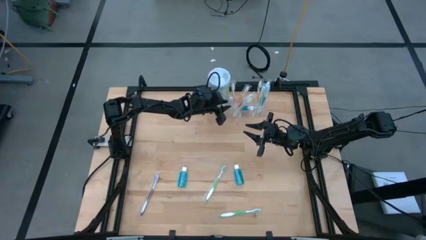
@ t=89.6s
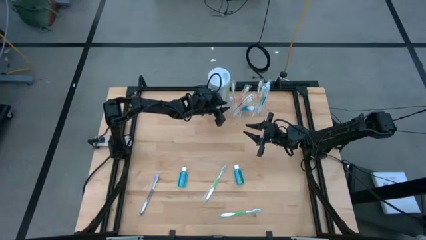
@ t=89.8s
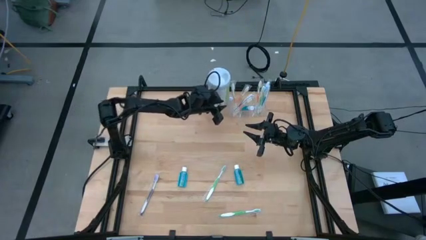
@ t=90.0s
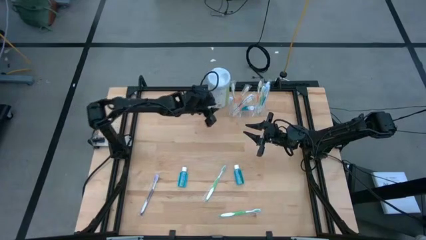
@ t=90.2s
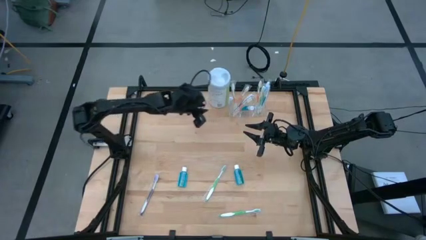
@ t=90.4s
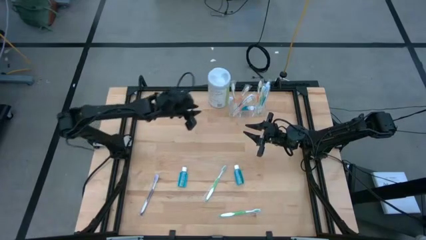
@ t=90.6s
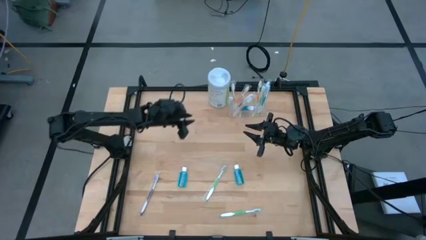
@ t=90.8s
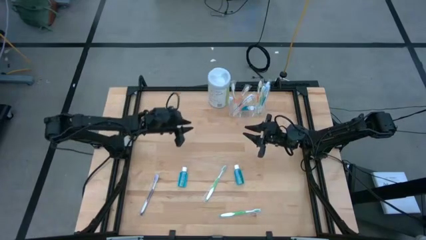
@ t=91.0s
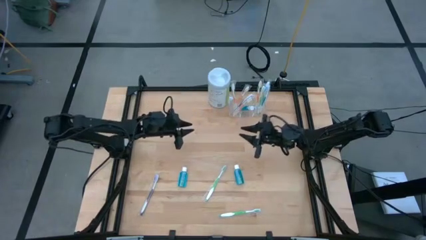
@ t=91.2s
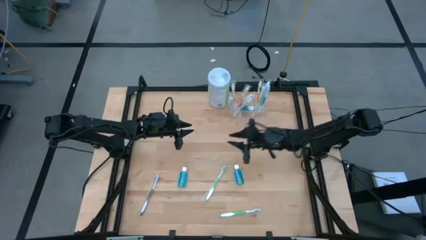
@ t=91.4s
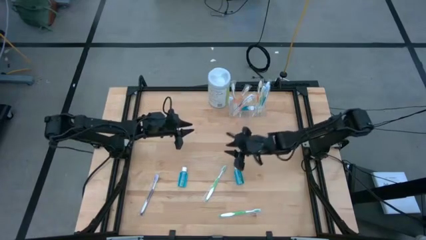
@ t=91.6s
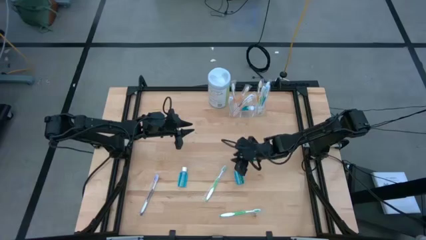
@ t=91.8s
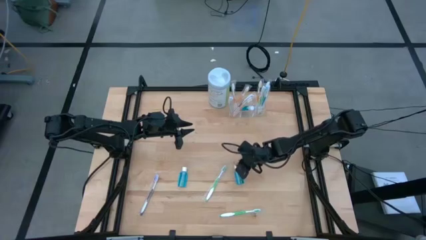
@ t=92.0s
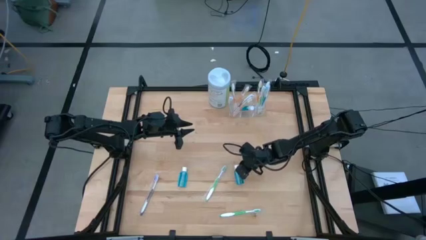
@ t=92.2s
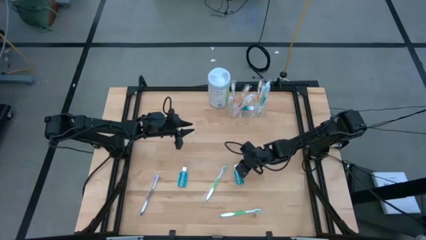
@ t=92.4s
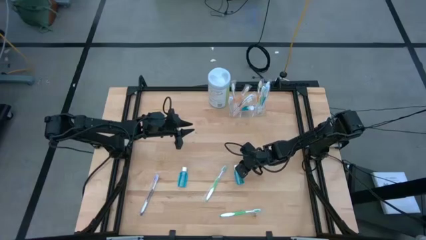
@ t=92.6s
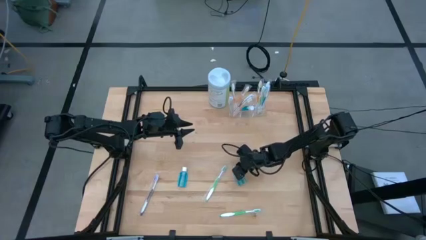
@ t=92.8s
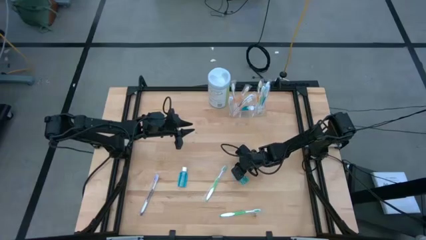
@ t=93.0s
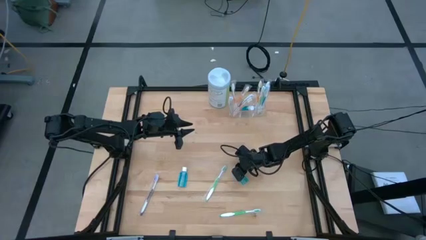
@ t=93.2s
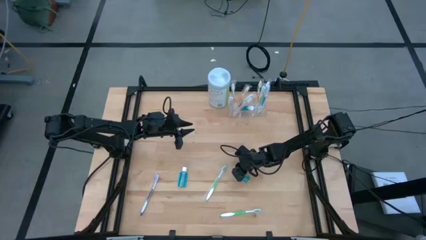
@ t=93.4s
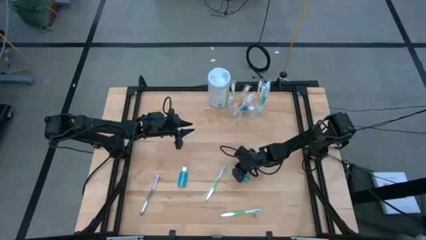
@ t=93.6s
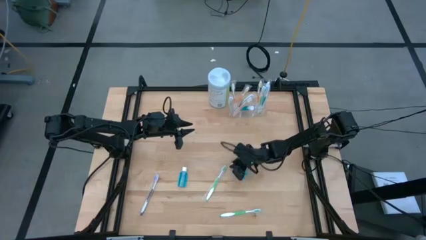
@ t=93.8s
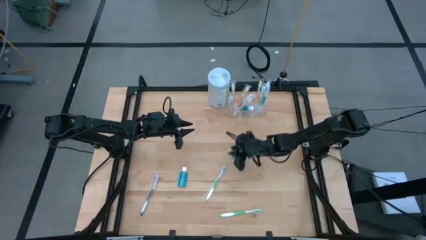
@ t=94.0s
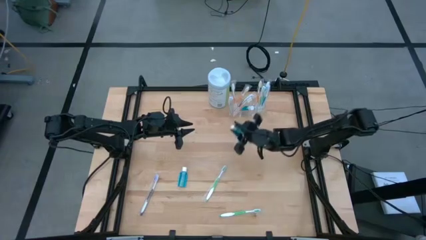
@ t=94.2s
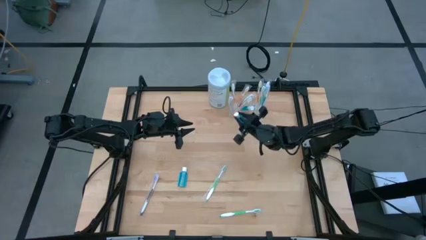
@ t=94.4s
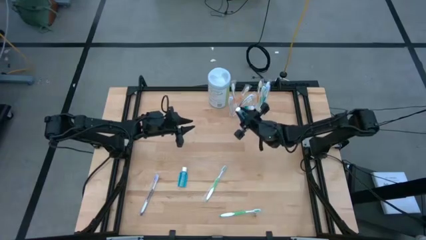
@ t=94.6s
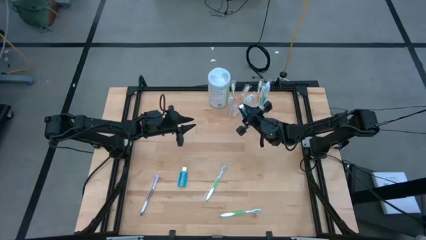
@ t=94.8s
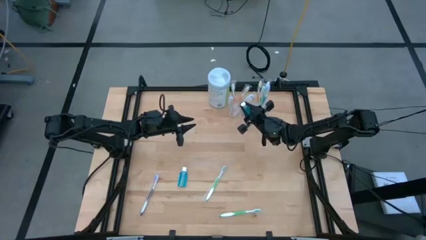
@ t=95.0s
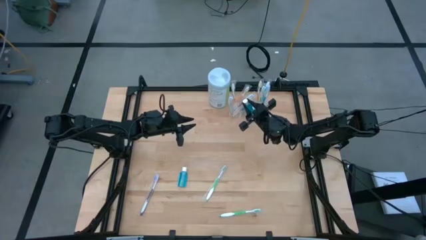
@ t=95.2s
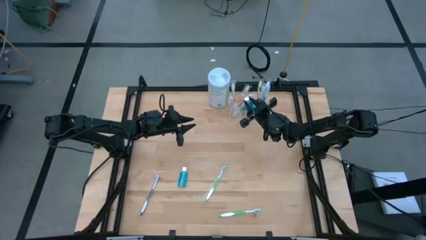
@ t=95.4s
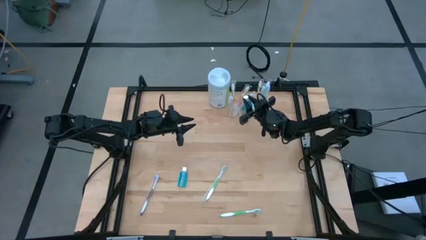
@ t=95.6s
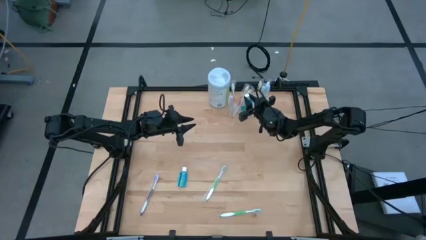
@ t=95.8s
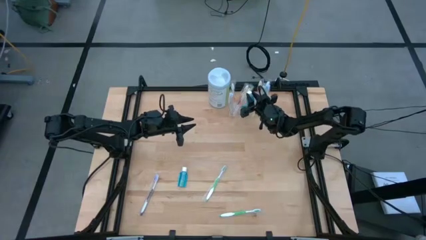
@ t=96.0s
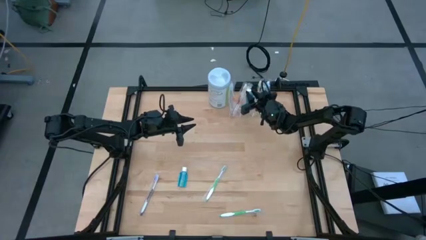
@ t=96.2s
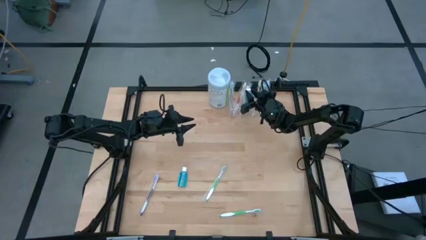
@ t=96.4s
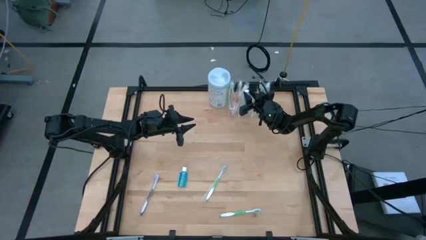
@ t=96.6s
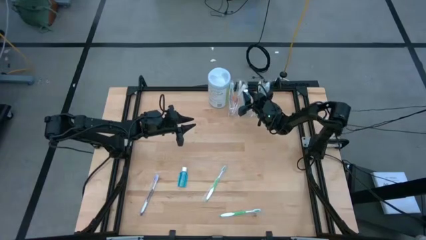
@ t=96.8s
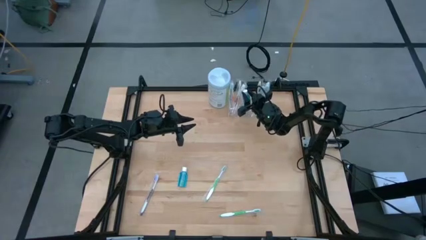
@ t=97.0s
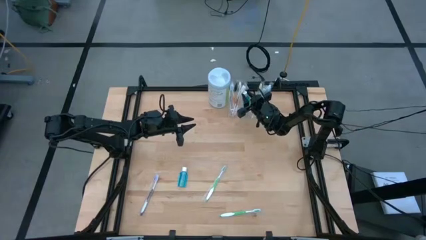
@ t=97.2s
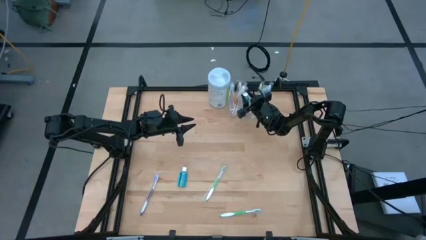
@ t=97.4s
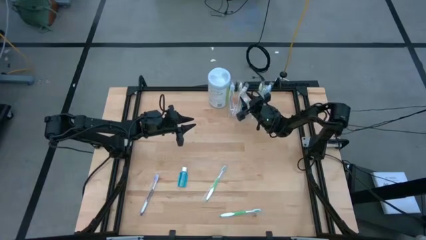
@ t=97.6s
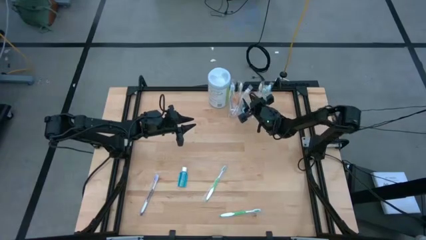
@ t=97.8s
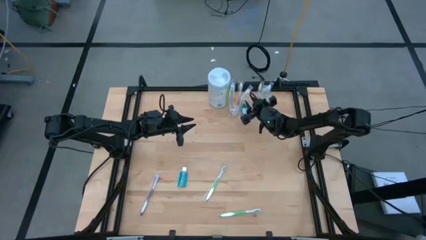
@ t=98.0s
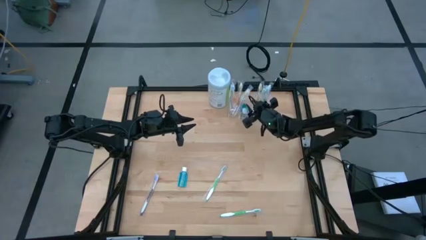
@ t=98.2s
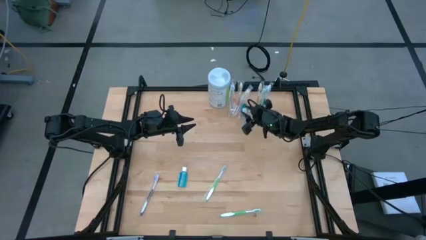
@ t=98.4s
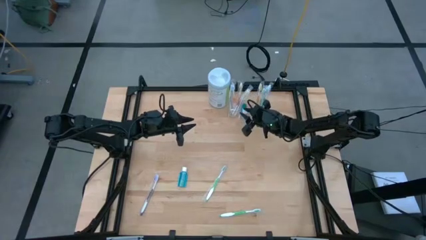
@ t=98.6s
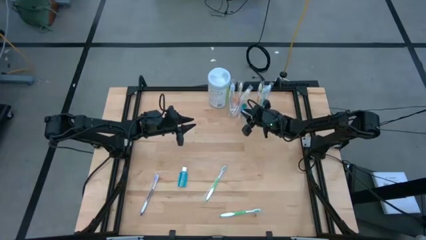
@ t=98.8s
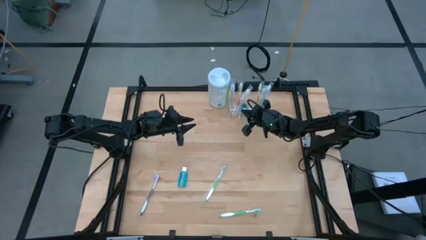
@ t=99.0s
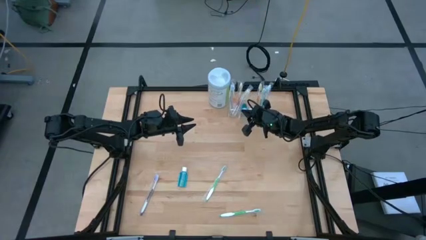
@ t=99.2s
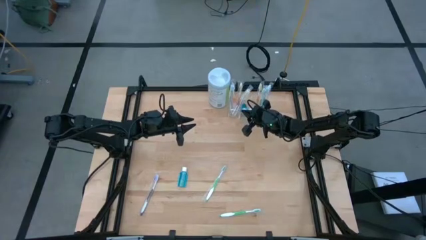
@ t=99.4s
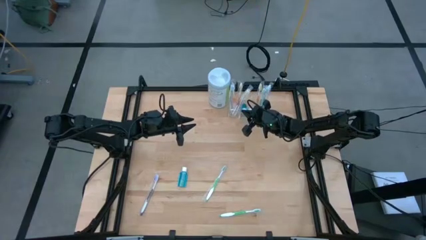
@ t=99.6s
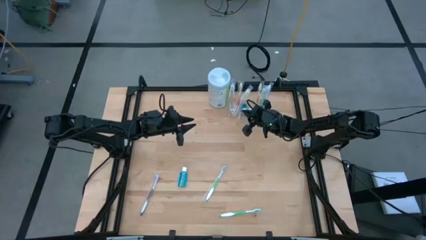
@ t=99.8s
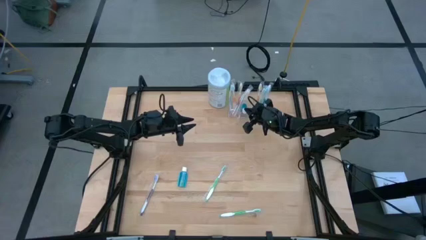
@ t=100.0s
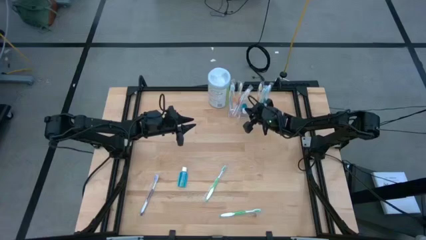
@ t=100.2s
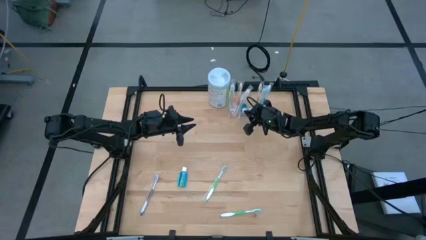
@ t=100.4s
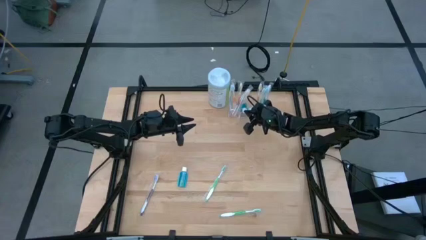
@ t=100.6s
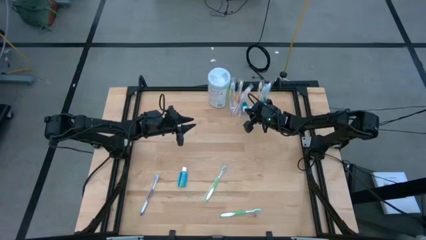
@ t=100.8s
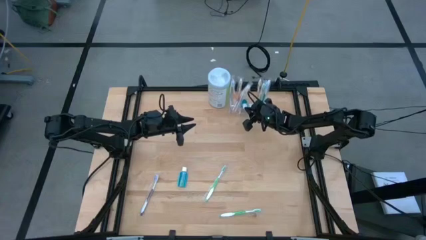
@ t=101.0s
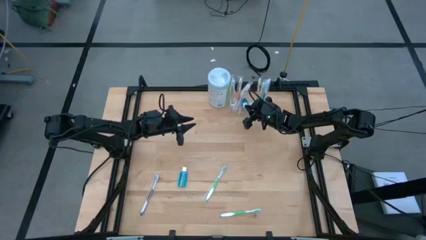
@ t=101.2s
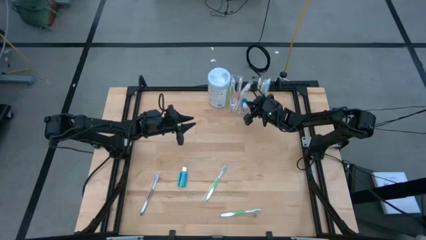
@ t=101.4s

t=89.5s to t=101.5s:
Task: Pick & Place toothbrushing station
Put the blue mouthwash into the transparent organizer

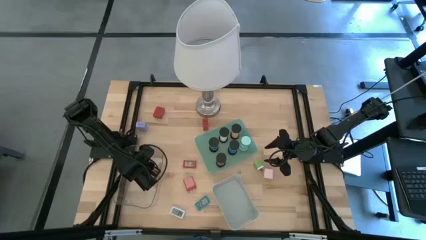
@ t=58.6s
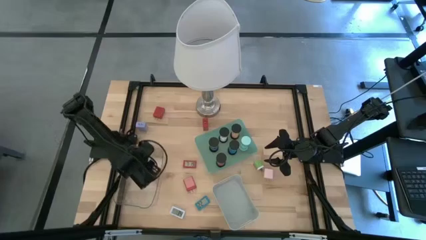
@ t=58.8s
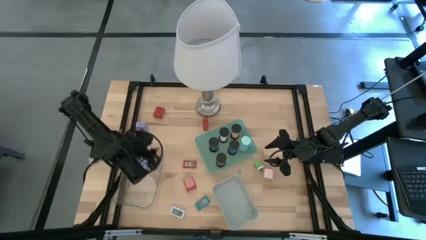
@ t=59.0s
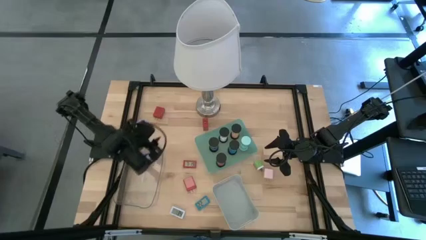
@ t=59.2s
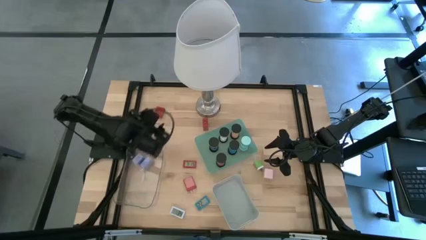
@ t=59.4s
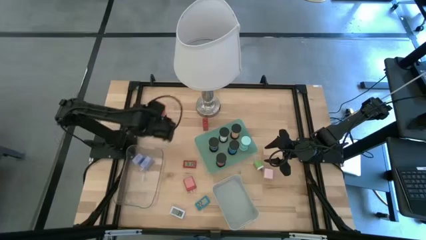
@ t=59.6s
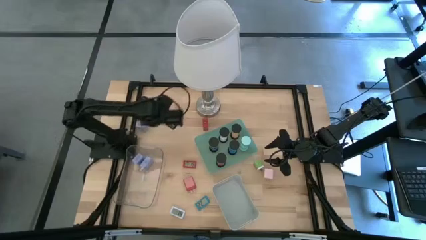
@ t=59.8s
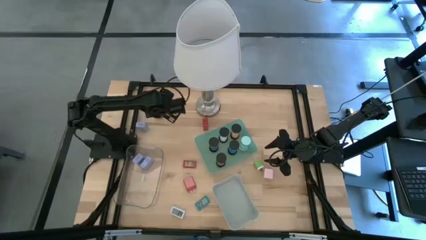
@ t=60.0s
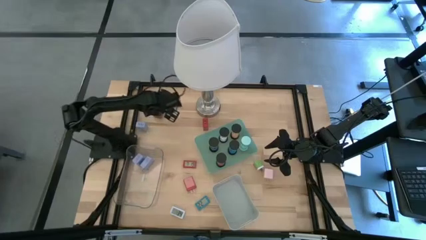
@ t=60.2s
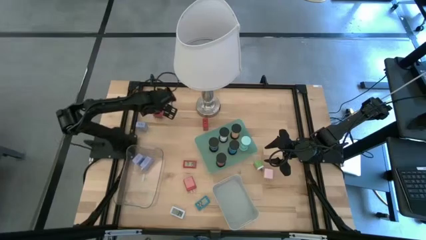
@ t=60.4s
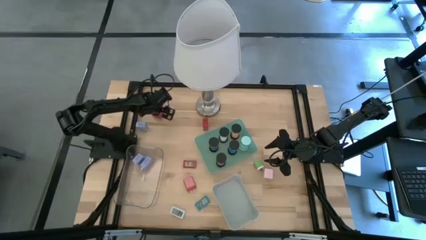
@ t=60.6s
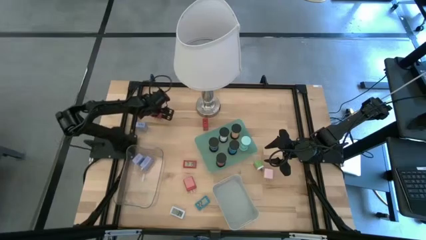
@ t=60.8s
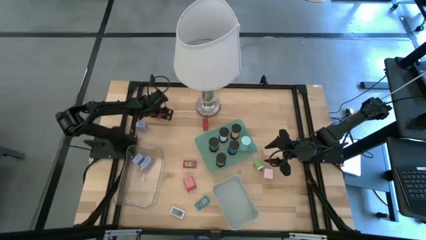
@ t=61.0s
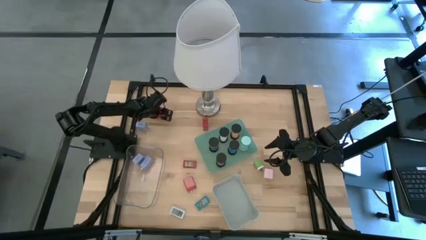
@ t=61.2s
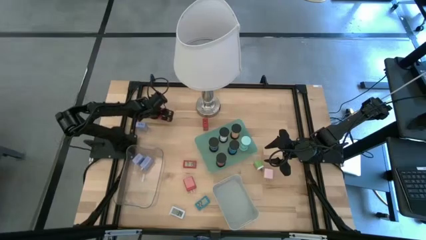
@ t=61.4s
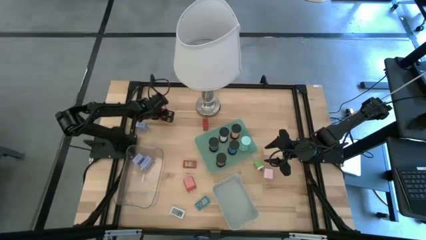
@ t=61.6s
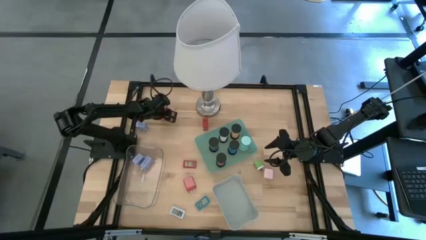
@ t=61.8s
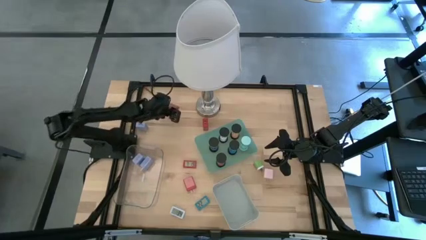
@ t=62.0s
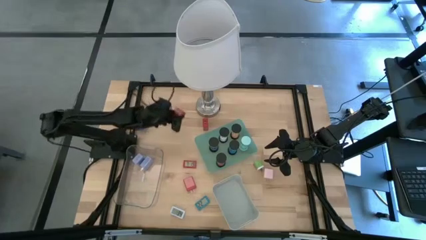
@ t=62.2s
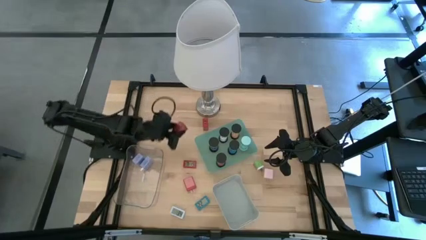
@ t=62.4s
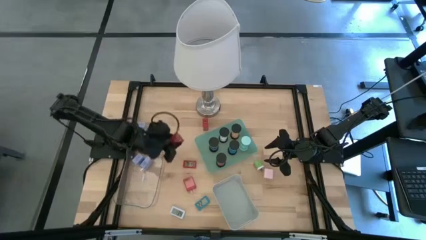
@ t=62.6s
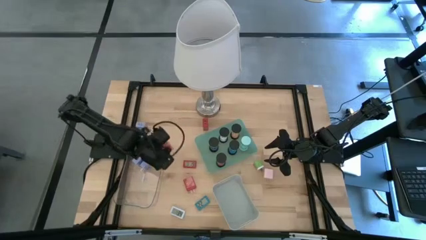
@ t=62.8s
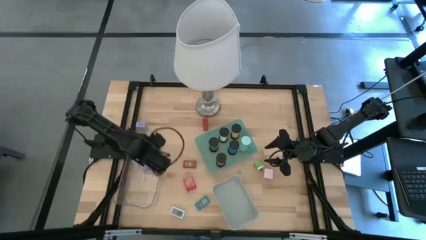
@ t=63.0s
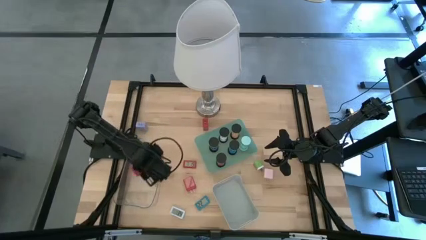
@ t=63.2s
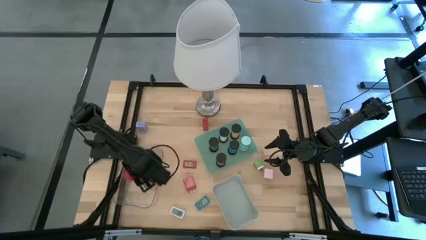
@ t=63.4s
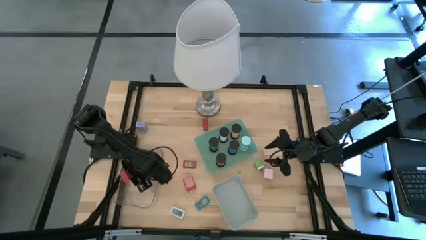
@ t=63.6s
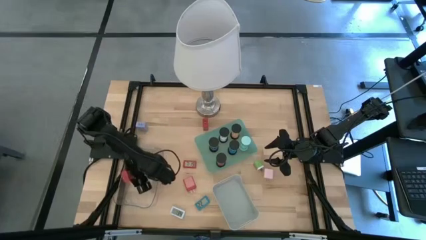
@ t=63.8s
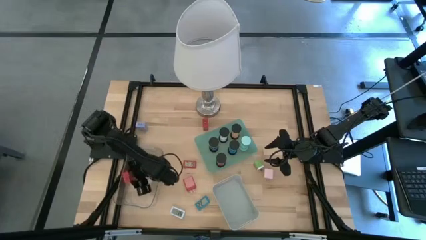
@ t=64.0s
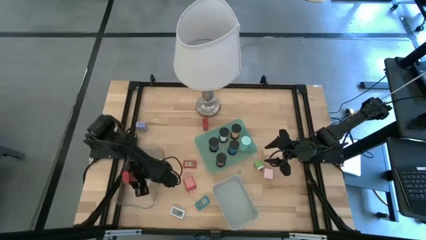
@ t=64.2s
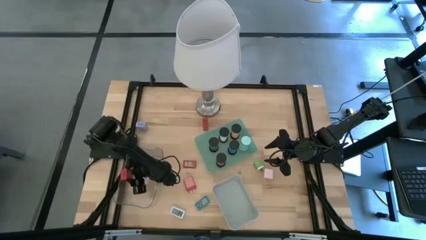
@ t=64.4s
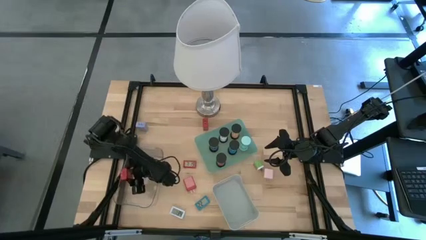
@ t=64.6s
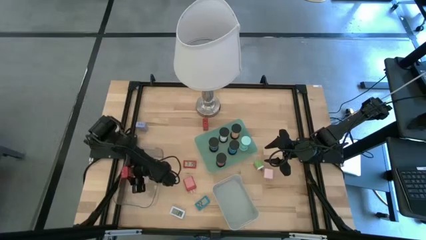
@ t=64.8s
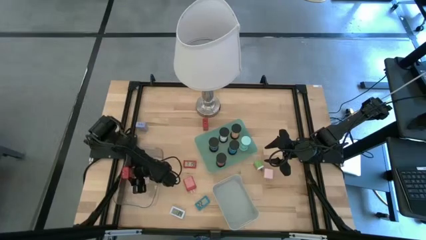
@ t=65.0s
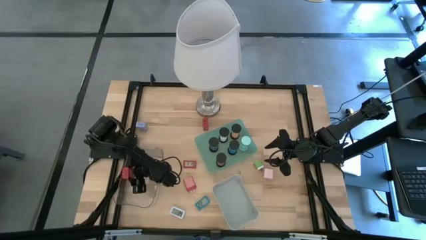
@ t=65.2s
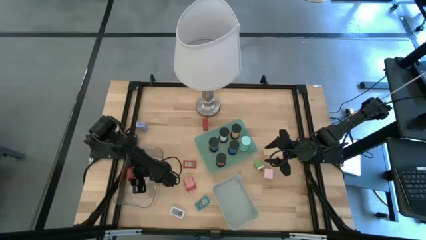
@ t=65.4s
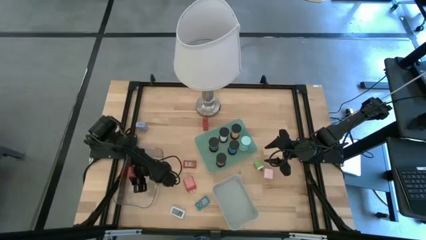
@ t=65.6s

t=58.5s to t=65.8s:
Task: Pick & Place Office items
Put the top red charger adapter into the transparent bin
